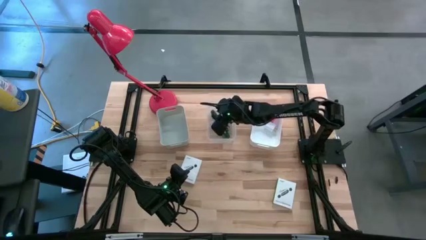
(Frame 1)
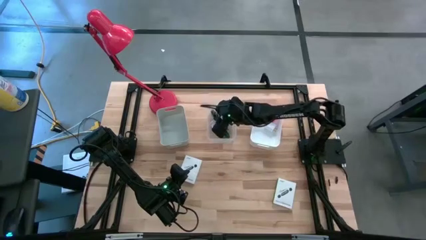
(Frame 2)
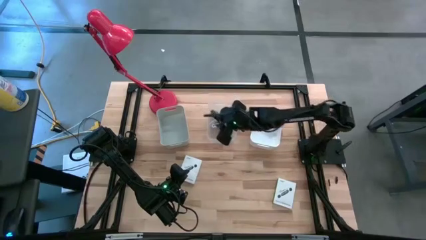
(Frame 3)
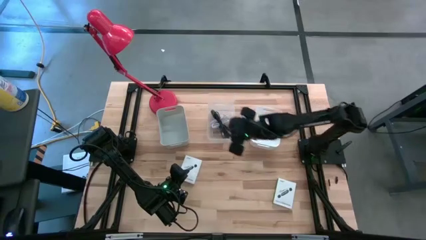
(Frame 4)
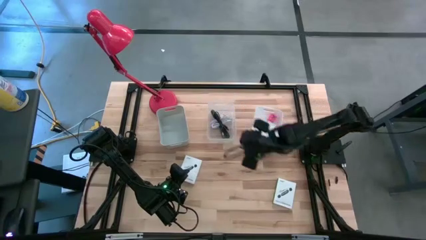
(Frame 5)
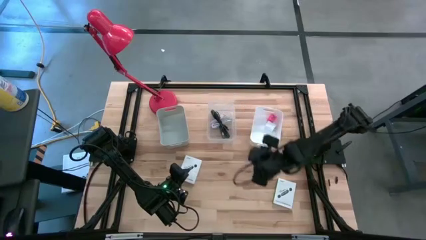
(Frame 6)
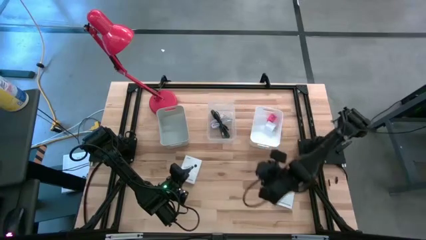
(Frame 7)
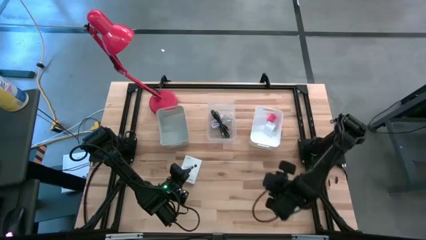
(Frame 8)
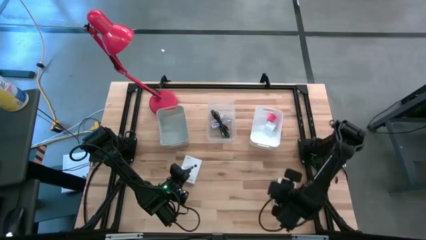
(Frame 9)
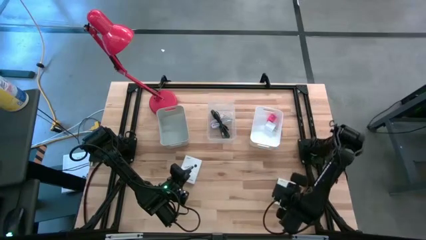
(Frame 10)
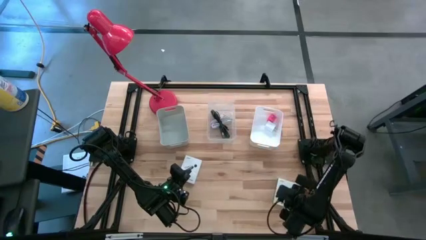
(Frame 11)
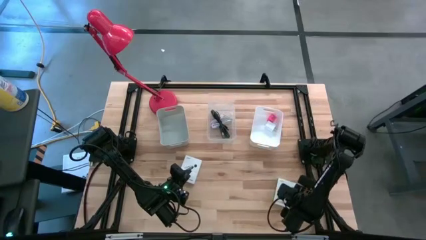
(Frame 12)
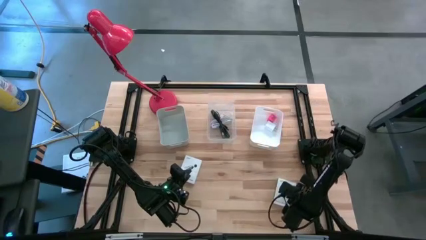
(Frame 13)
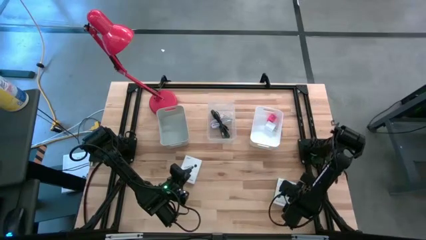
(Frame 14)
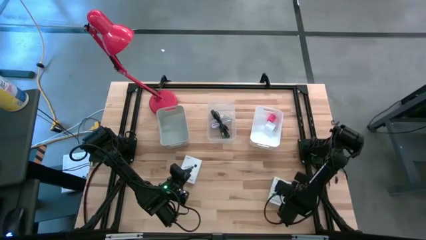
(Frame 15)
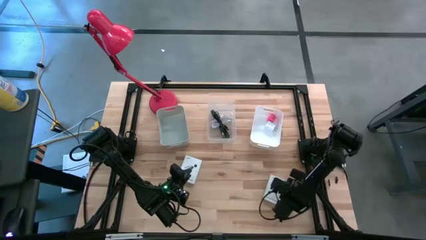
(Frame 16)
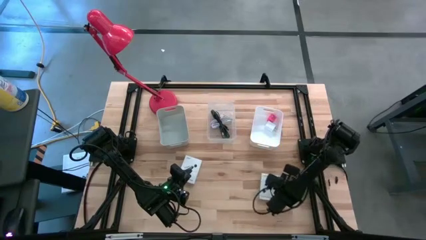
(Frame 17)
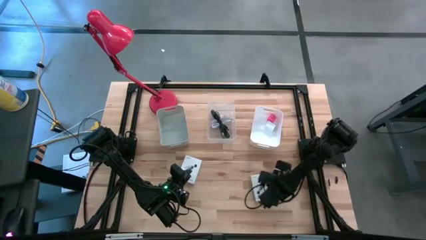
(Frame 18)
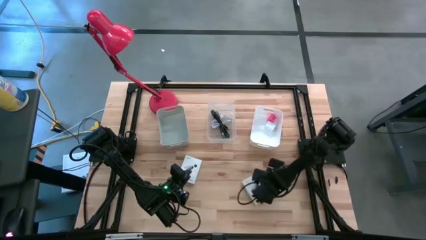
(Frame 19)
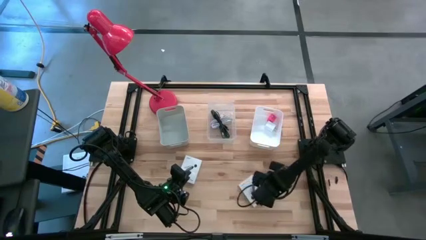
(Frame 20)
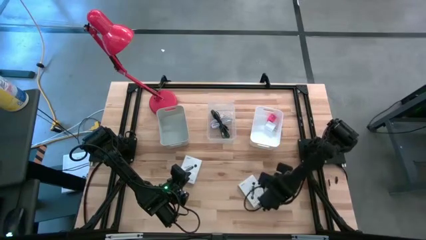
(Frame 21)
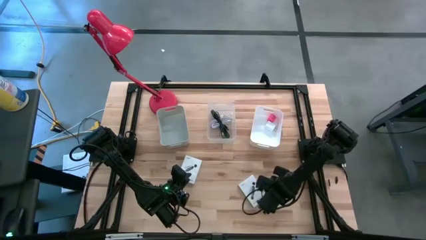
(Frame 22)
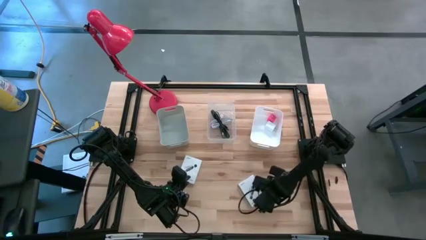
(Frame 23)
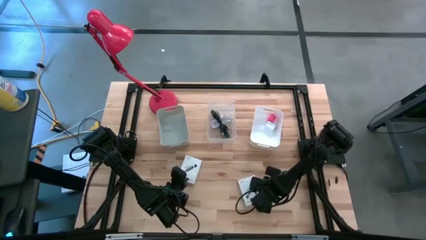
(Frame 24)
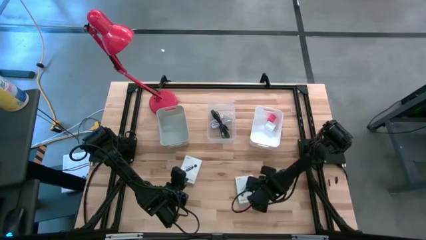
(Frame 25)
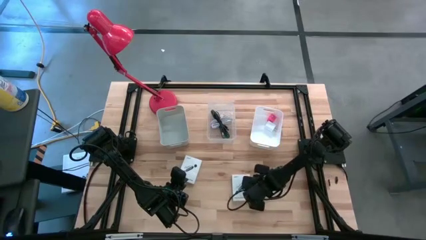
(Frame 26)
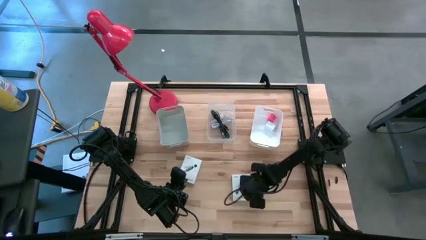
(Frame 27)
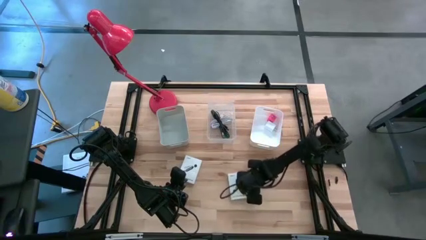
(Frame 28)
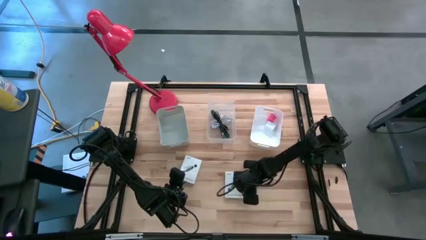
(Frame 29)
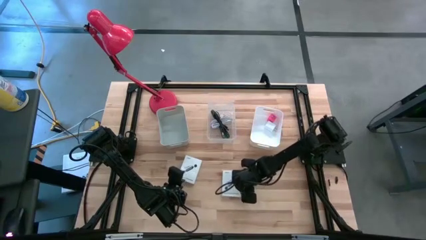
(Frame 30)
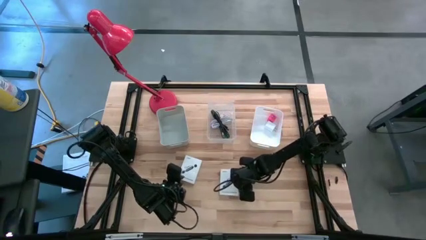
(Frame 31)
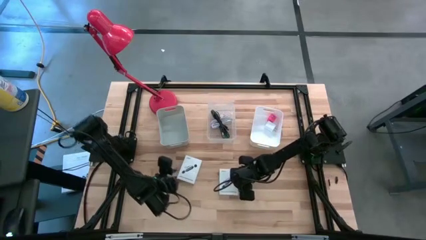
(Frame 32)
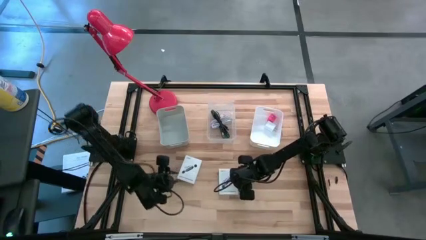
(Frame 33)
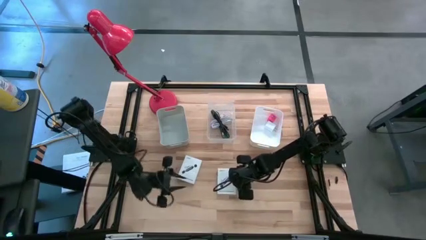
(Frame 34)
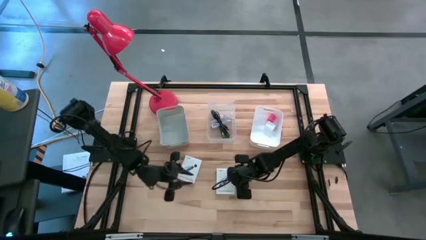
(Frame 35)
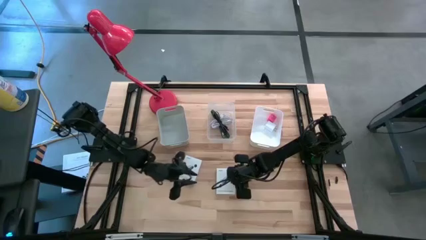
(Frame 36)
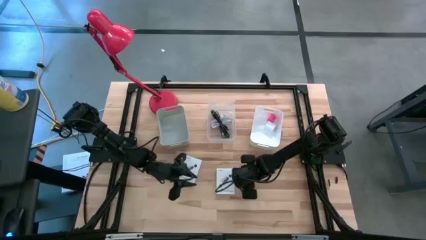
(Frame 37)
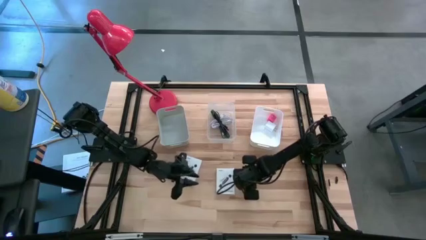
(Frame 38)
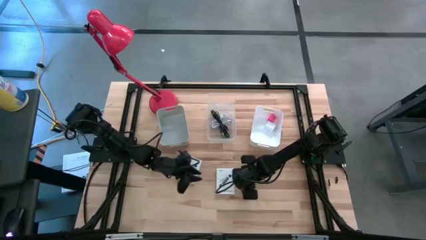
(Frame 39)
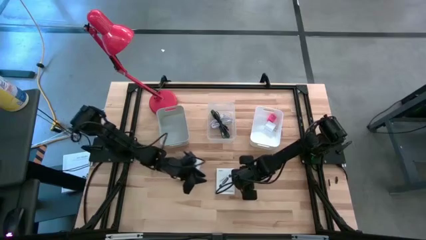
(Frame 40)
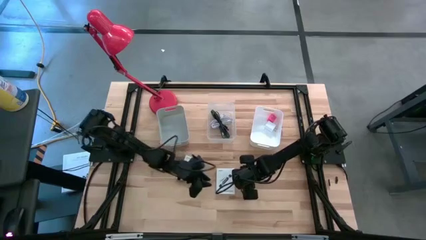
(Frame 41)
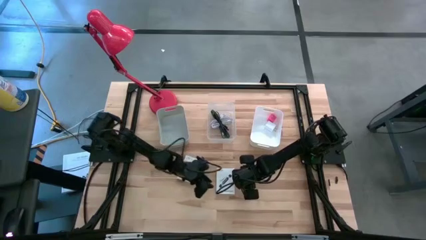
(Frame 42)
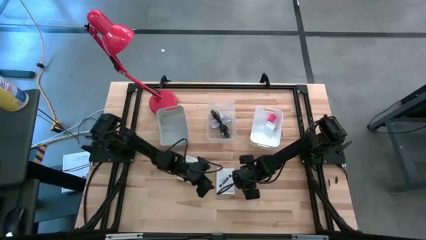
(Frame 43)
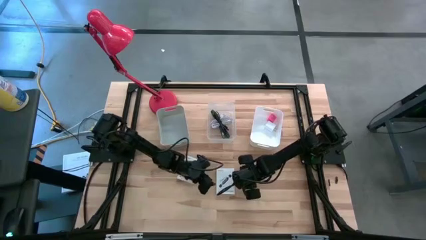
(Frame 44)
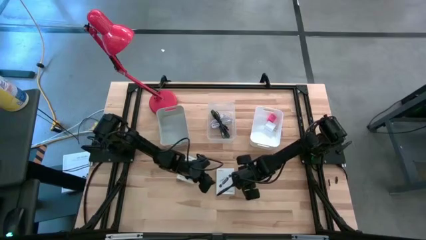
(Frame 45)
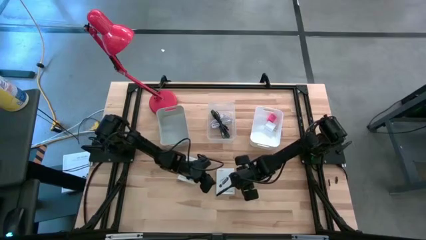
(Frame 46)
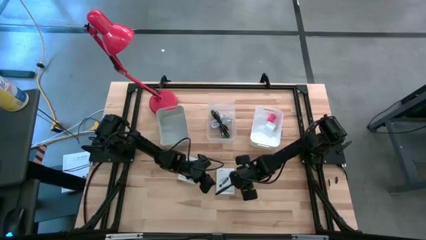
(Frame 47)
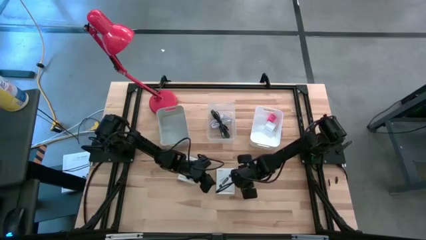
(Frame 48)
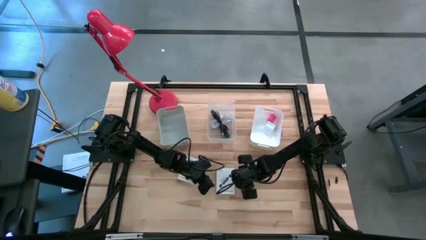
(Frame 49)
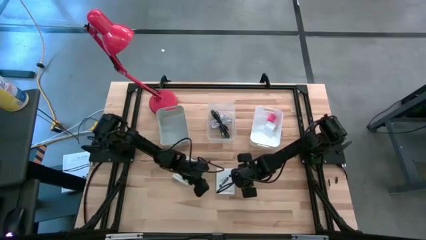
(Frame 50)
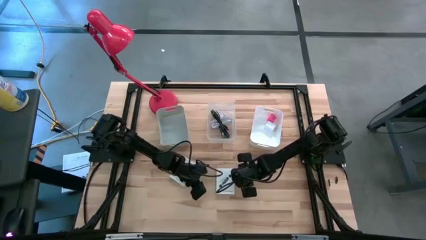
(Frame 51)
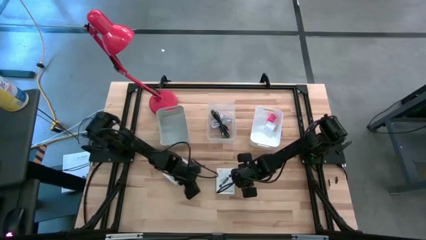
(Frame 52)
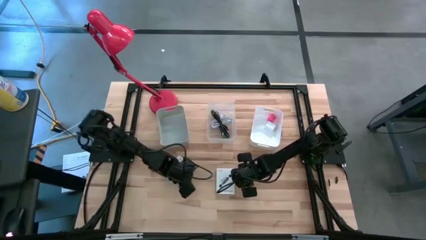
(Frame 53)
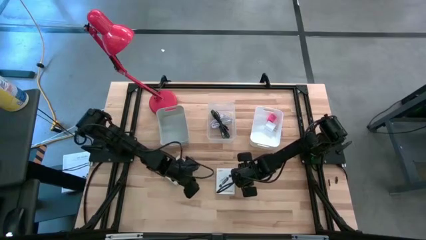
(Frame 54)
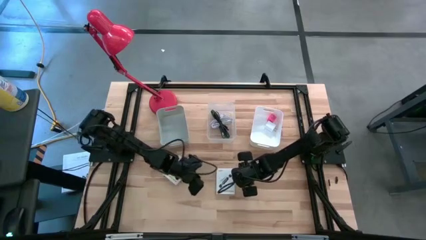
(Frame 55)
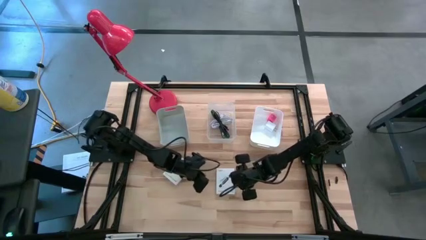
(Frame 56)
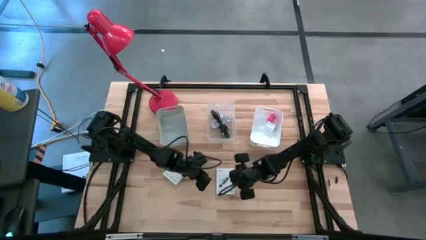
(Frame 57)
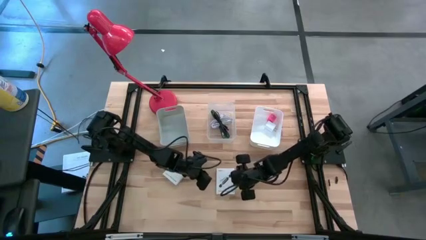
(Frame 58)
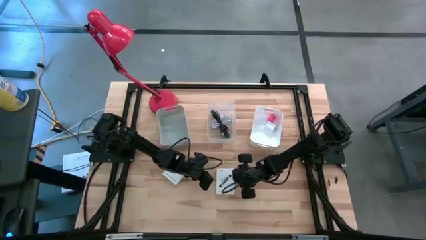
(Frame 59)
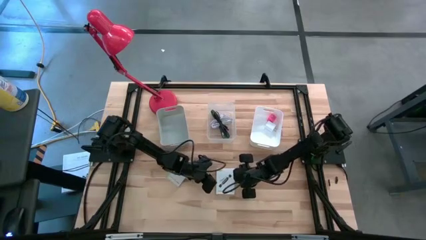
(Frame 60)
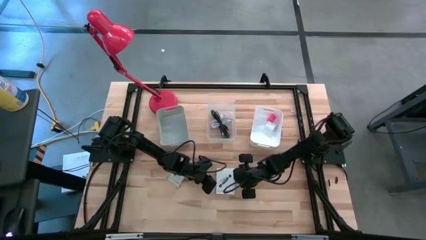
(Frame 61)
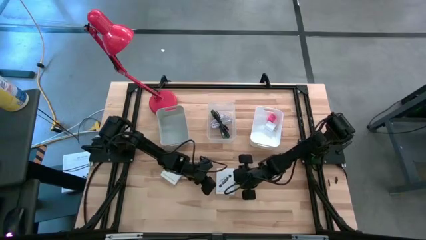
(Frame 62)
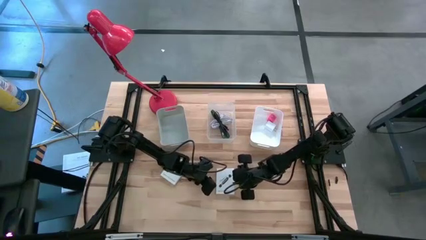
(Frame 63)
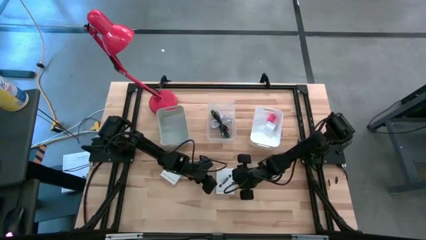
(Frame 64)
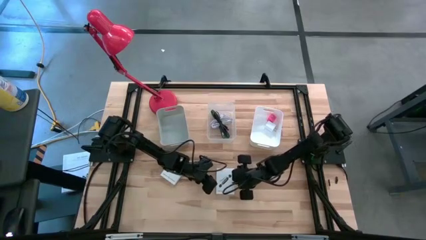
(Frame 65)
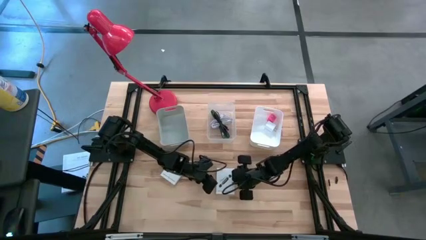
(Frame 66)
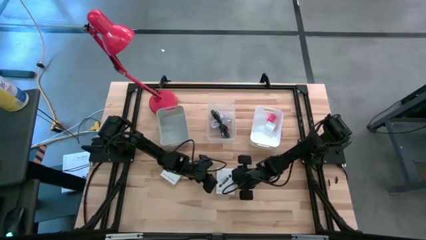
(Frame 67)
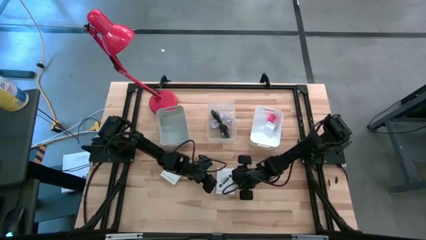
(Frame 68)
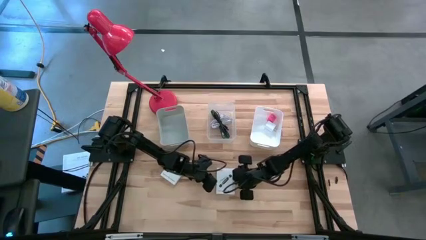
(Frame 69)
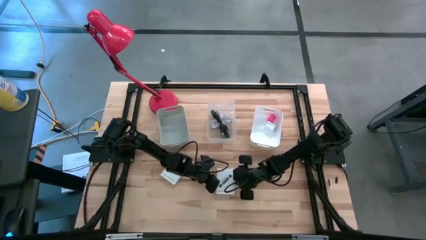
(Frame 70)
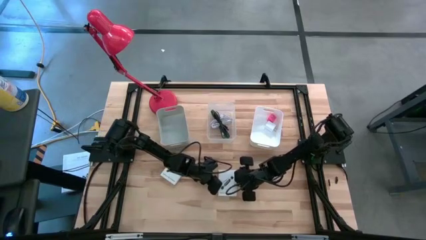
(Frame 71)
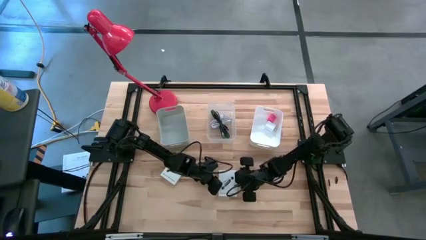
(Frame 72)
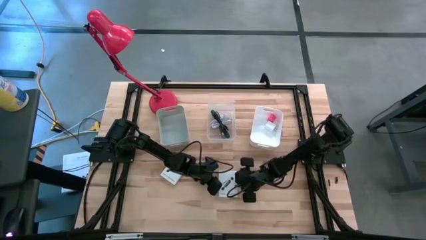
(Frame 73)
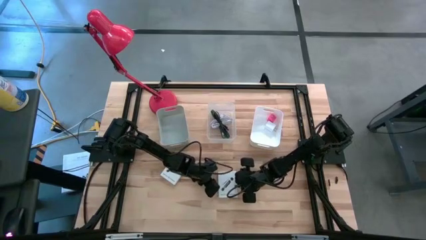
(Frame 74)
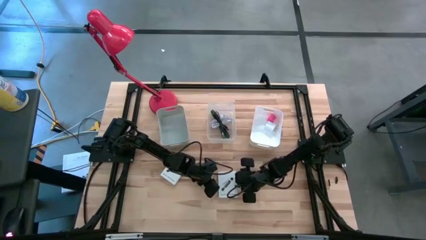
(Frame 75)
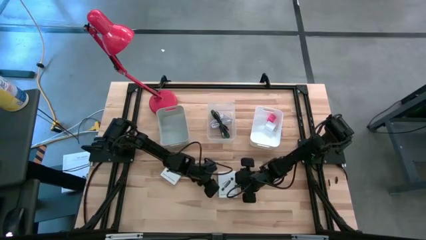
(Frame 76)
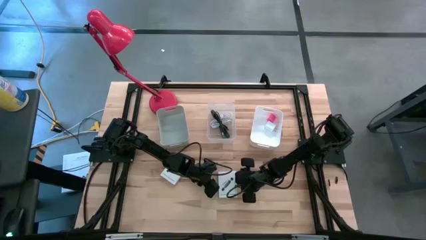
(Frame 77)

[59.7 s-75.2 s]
Task: Pick and place items into bin
Put the right white card reader box into the gray bin

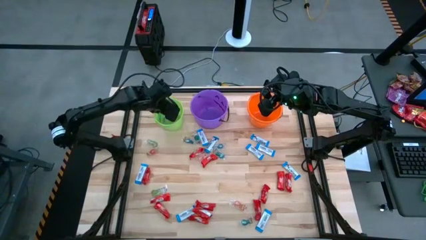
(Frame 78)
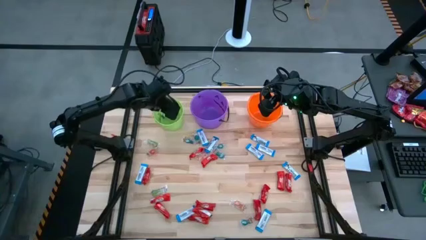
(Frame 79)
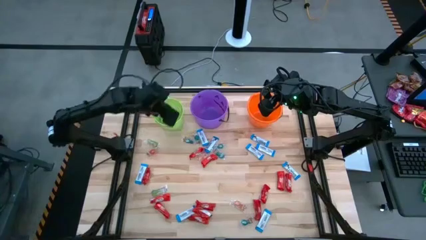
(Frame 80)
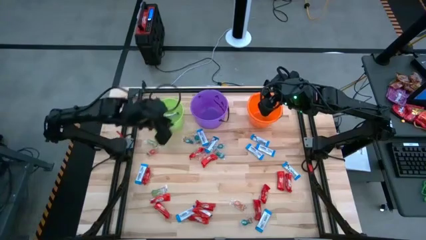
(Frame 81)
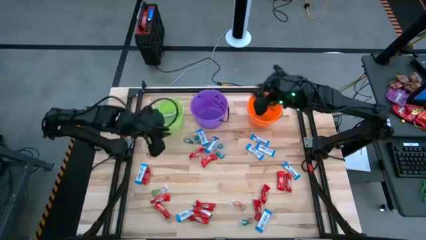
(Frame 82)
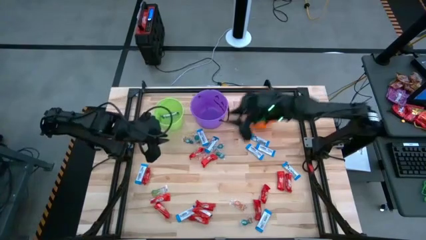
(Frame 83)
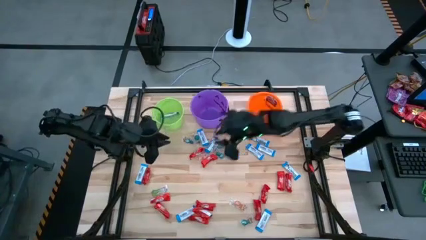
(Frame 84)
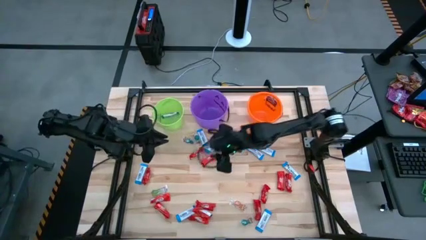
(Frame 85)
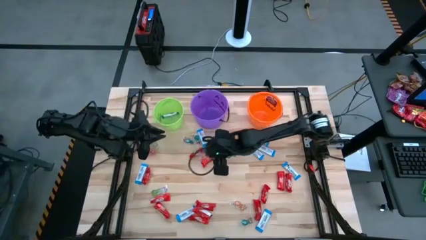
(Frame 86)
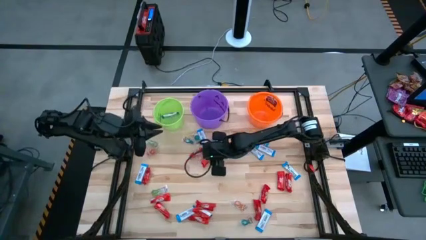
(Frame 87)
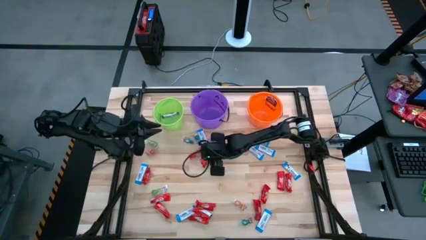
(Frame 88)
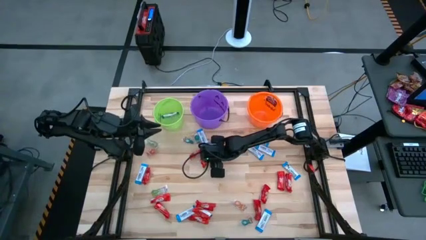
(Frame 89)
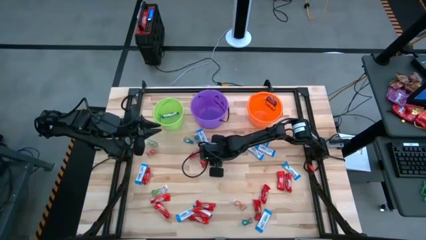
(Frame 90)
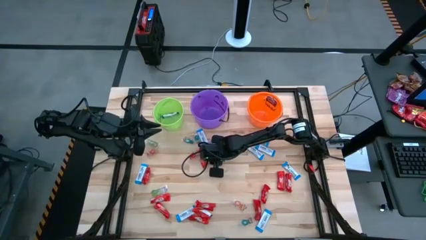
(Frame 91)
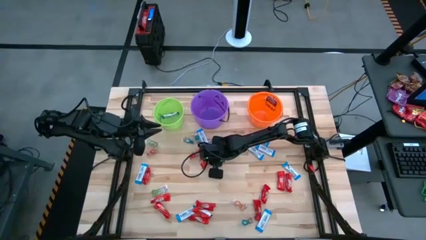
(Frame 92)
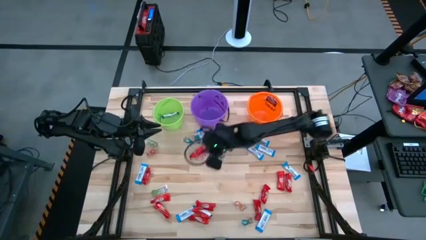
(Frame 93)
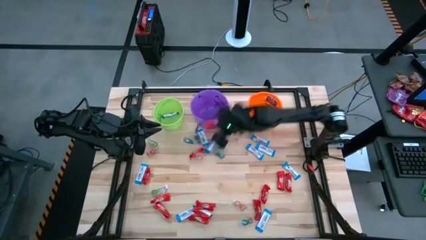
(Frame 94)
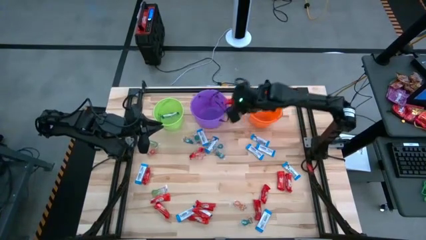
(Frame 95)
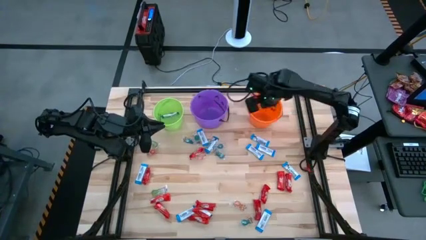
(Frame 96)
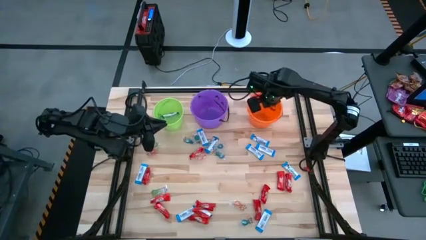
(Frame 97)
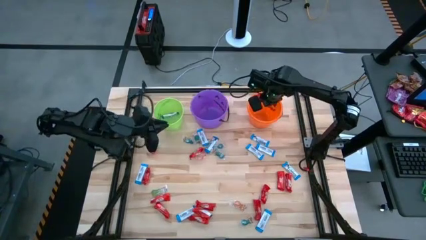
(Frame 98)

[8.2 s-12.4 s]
Task: Sort candy by brand, put in halloween buckets
Put the red chocolate into the orange bucket
